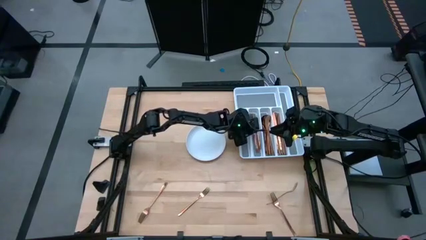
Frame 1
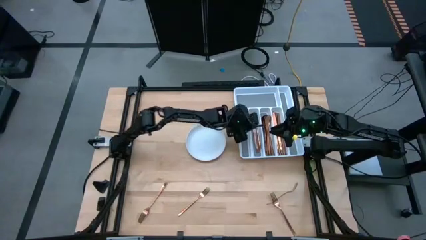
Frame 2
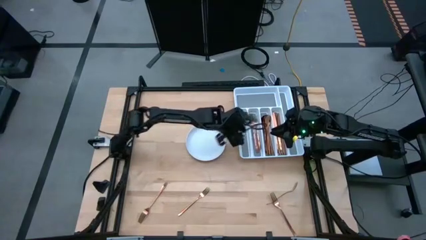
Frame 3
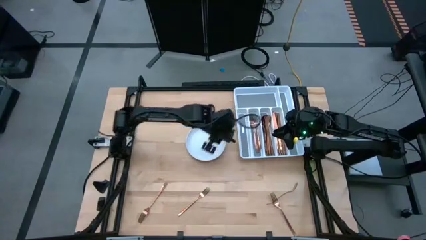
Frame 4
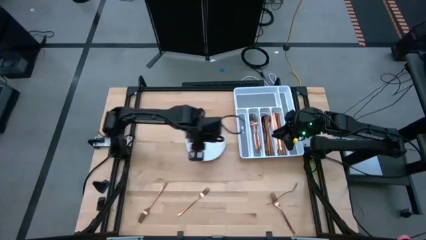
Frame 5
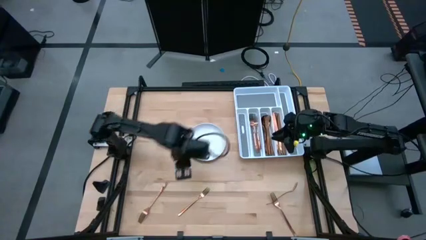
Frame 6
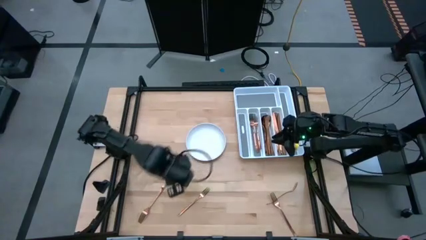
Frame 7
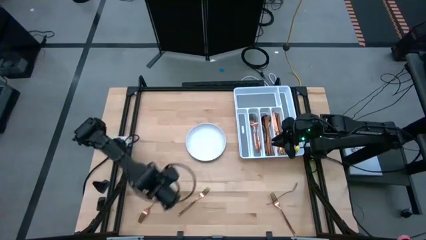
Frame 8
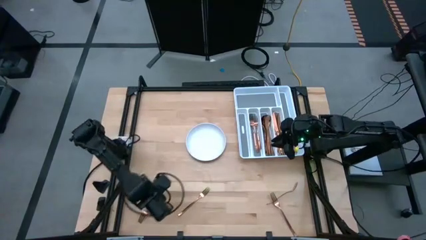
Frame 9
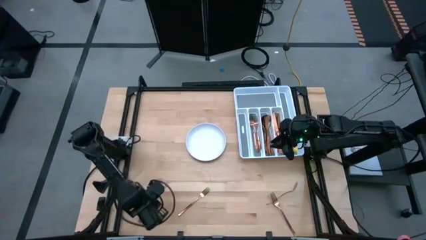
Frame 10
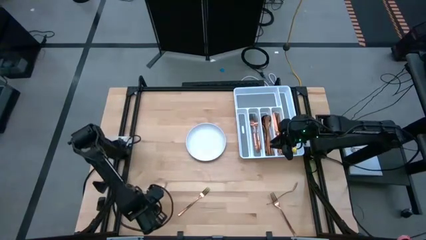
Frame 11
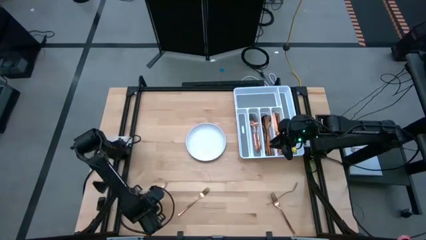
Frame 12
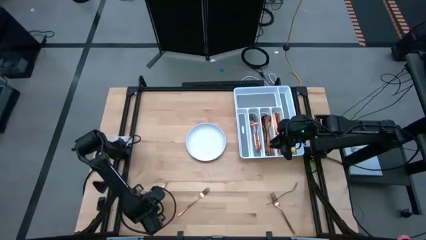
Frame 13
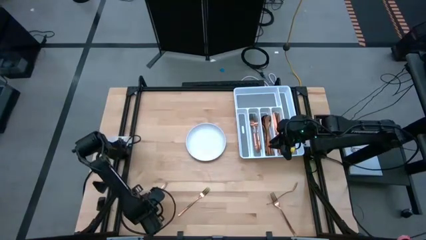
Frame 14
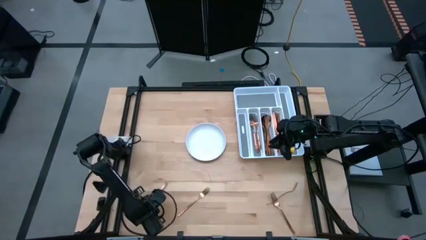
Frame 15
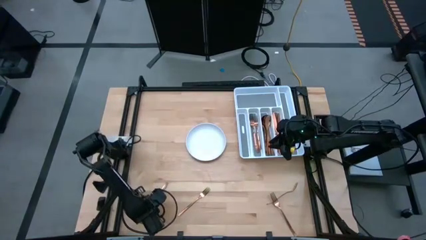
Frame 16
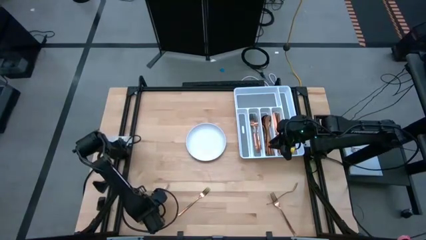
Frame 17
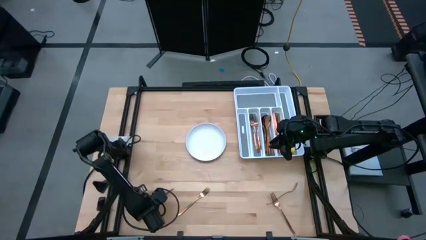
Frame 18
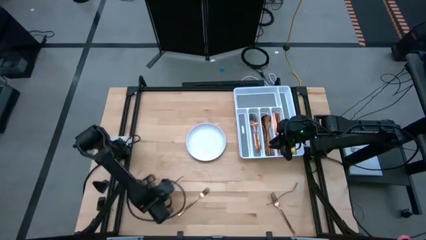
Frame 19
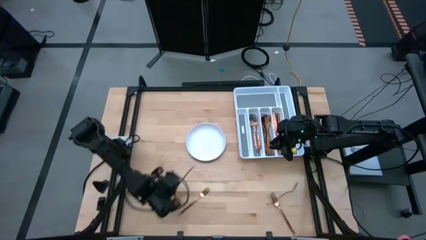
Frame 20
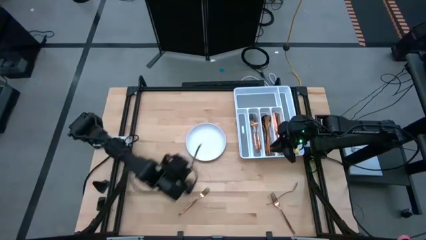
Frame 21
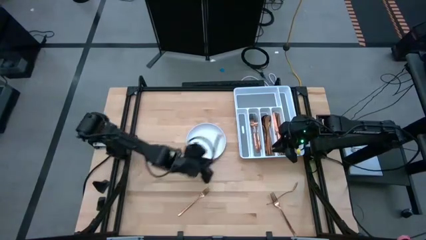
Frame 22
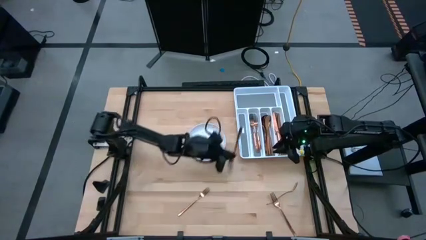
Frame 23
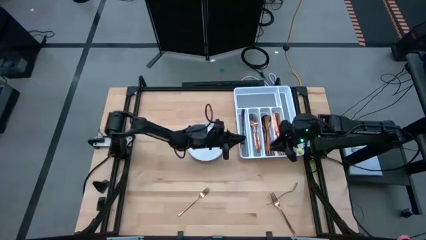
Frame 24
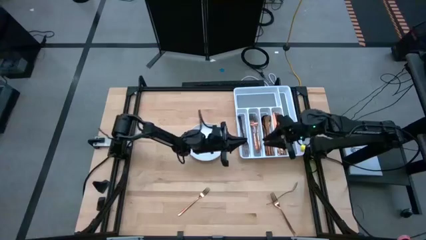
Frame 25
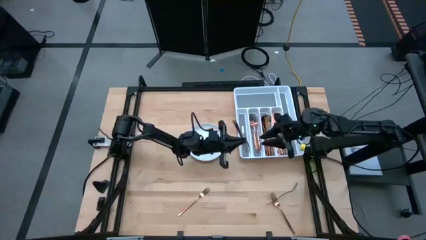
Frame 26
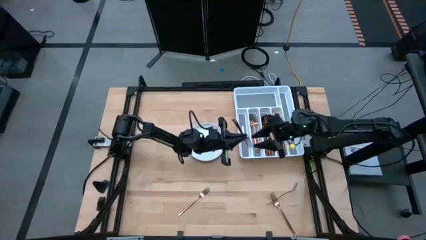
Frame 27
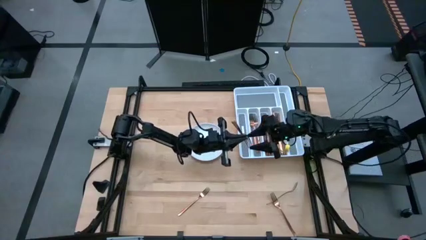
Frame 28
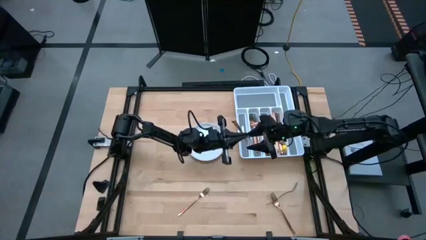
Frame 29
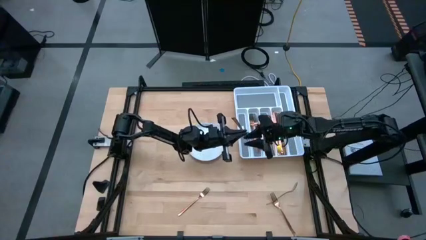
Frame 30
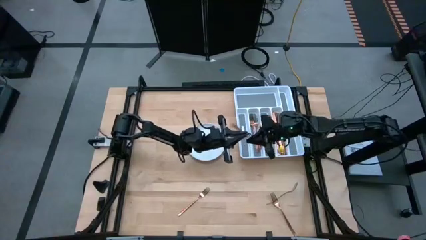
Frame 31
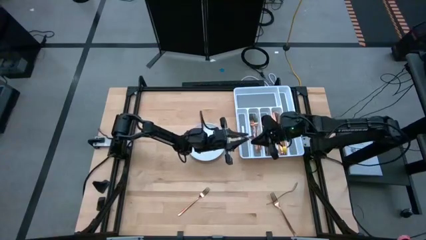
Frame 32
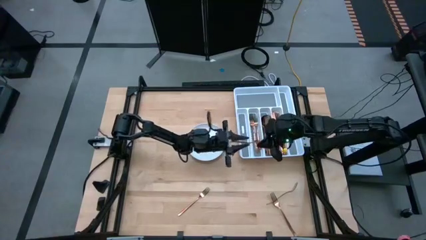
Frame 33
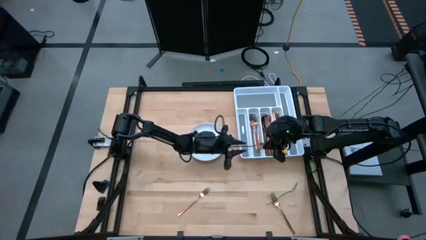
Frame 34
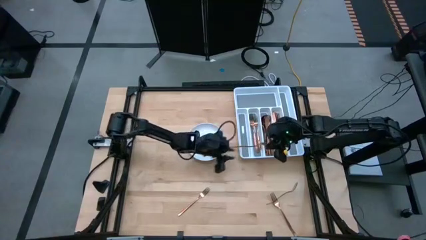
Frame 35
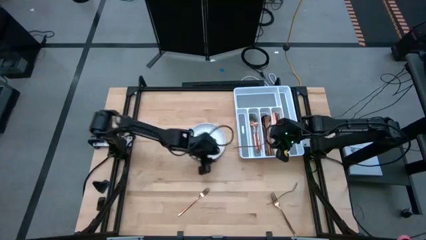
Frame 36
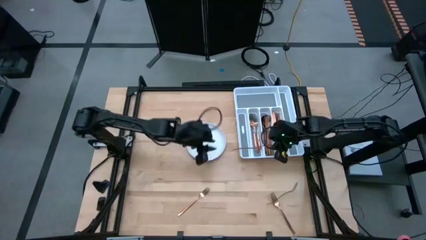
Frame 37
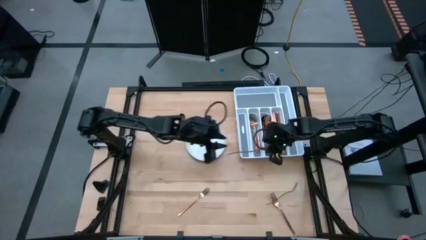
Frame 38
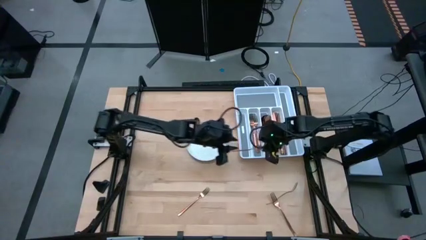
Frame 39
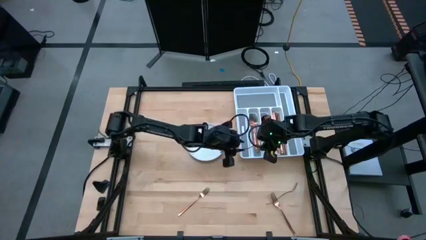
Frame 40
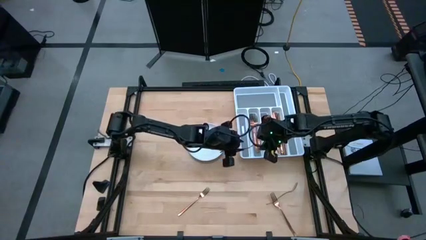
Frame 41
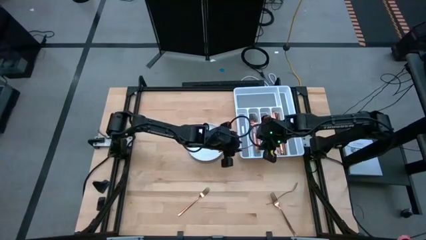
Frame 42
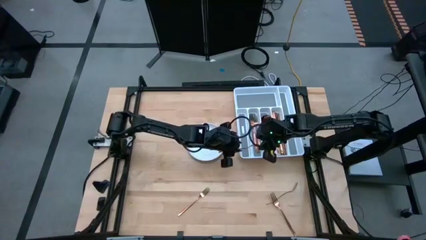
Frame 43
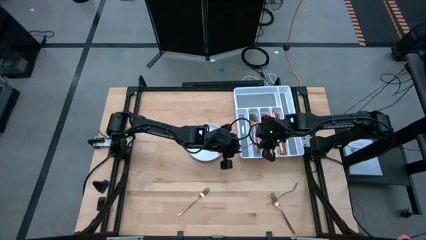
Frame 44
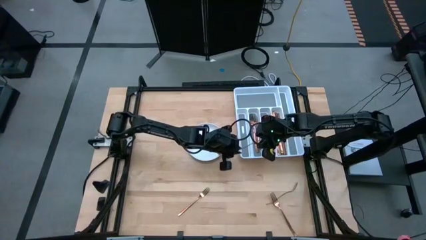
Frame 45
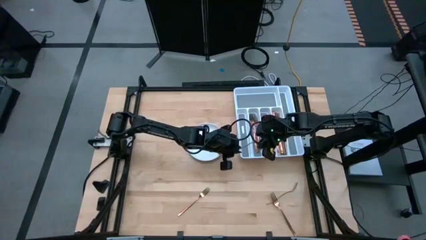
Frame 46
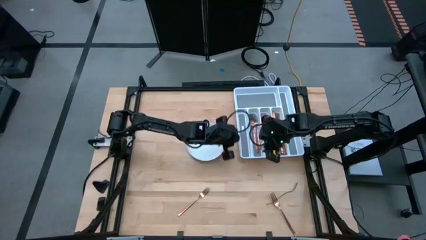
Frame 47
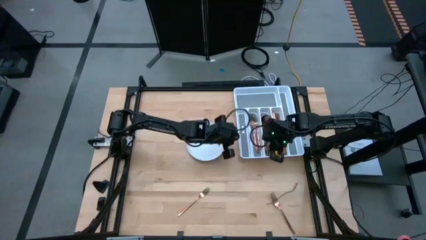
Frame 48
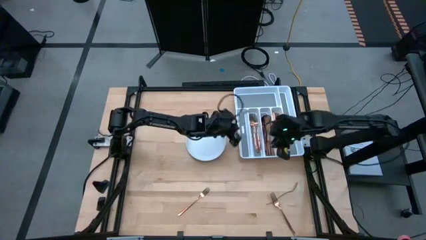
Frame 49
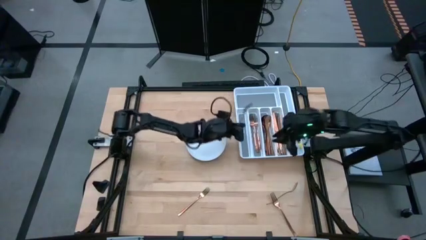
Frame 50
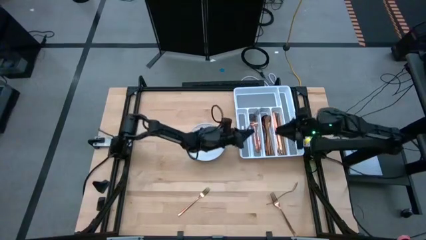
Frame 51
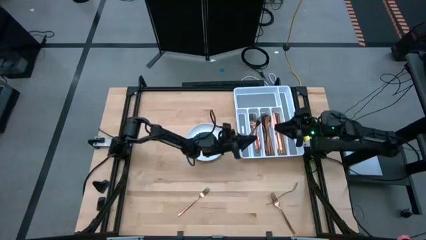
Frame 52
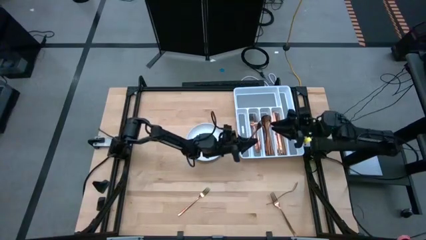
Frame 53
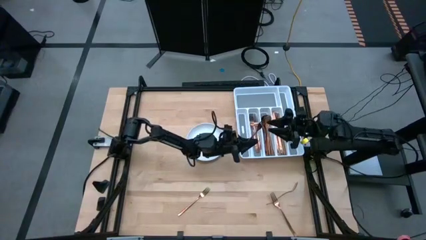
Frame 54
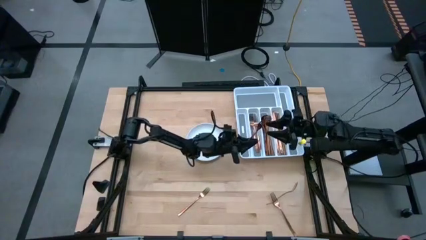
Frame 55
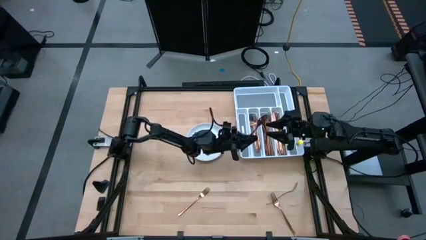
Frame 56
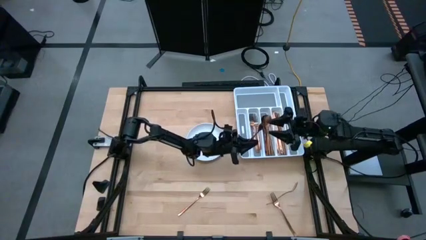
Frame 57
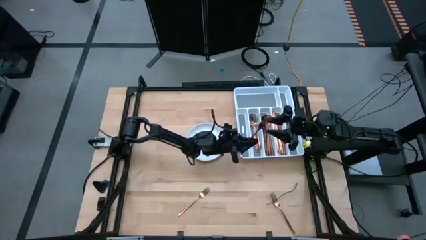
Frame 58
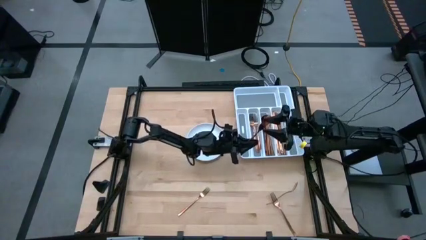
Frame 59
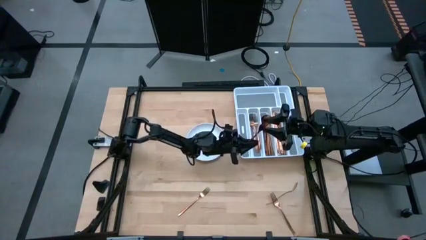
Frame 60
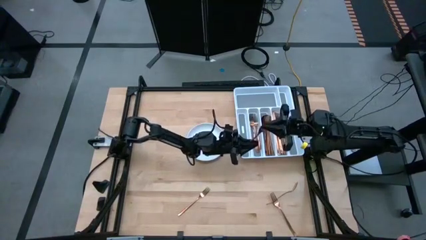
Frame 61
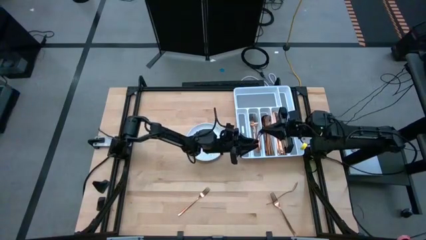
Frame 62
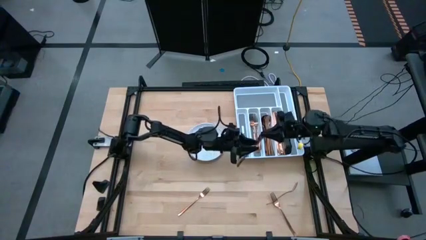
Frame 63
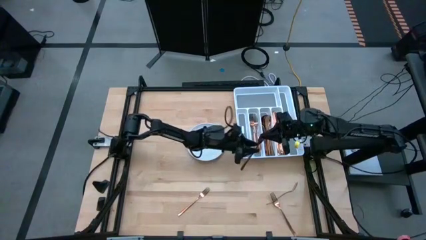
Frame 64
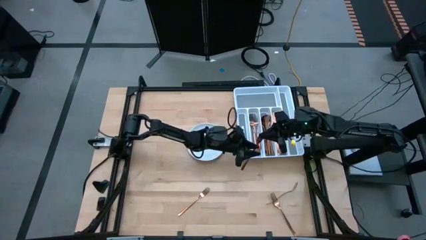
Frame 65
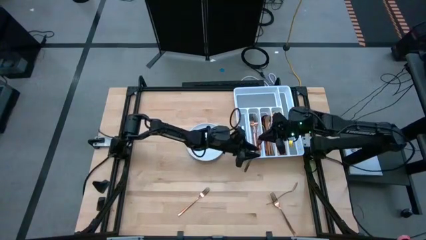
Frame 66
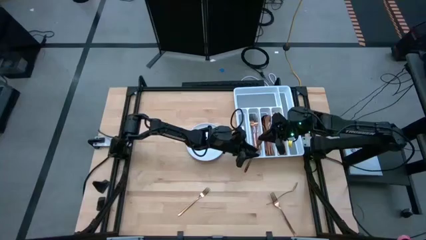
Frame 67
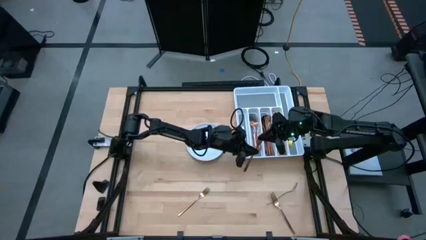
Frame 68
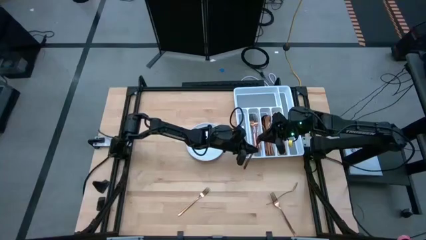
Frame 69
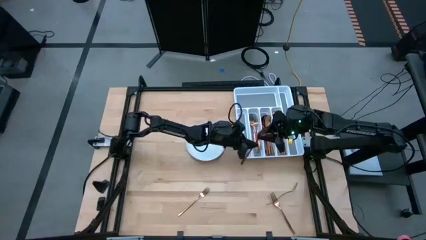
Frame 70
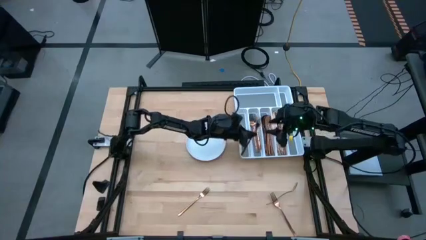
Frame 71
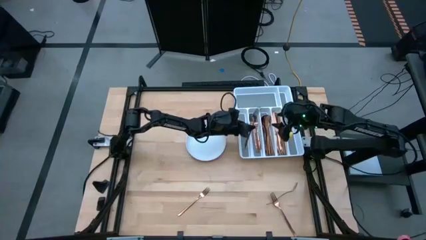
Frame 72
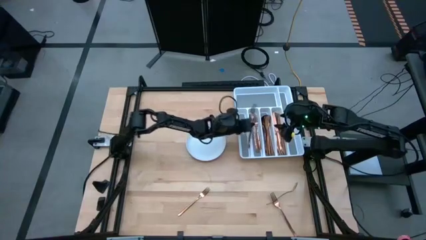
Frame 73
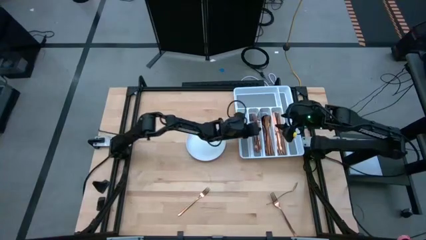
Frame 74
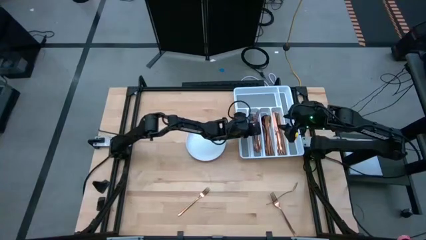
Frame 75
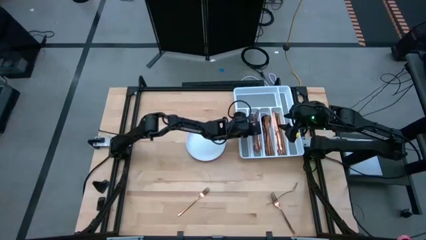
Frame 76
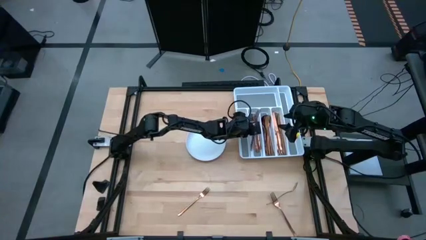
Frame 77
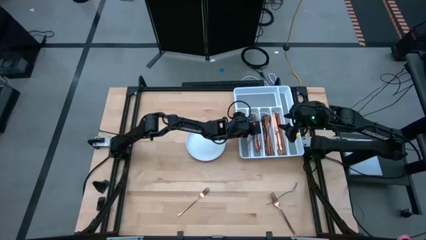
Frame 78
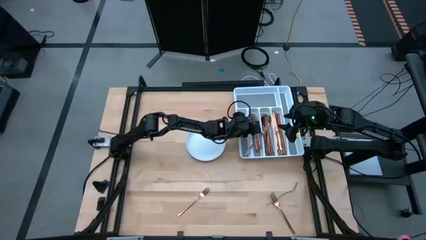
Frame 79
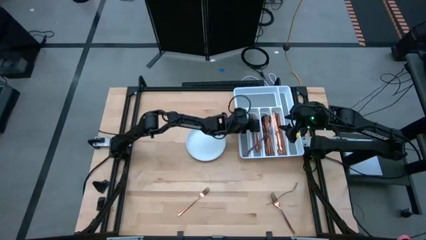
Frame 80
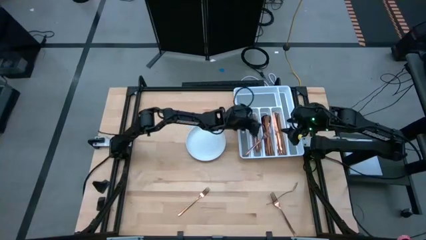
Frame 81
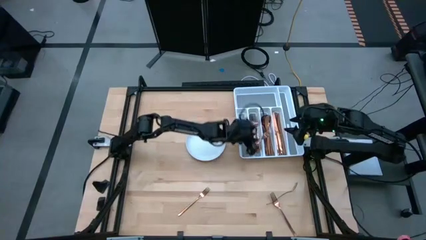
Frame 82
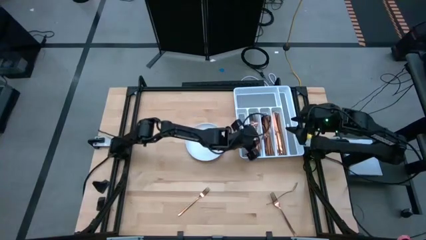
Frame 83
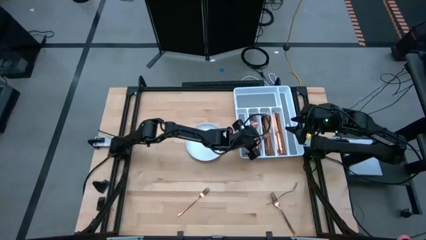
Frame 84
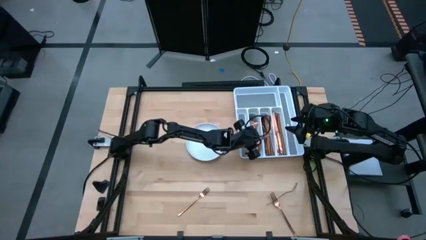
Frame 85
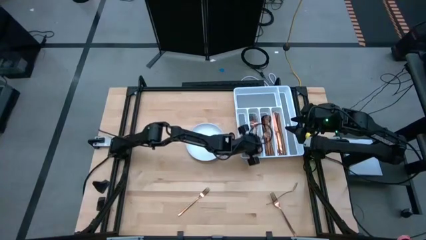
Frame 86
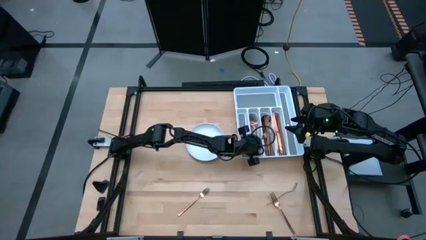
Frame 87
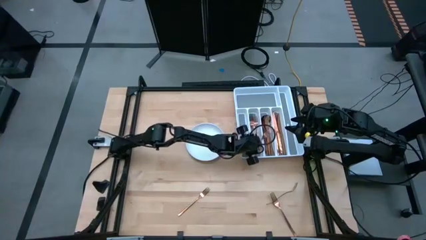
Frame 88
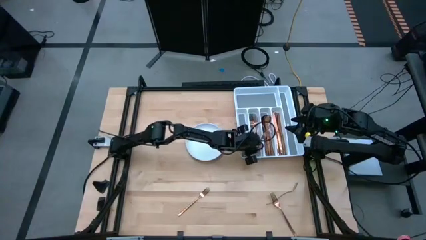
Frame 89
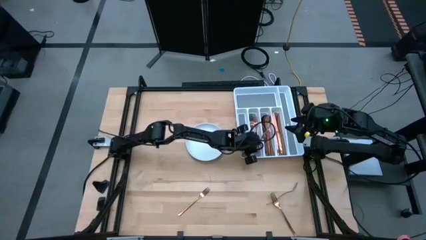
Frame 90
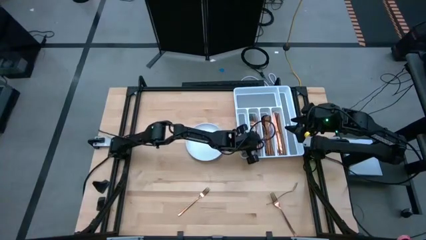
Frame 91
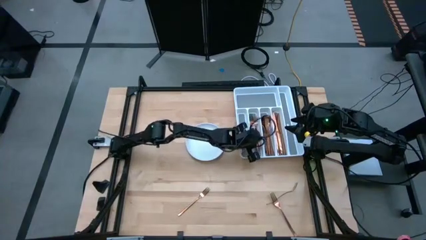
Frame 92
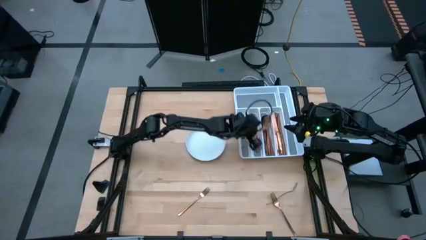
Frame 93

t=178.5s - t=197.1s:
Task: Sort silverware
Put the fork in the silverware tray
